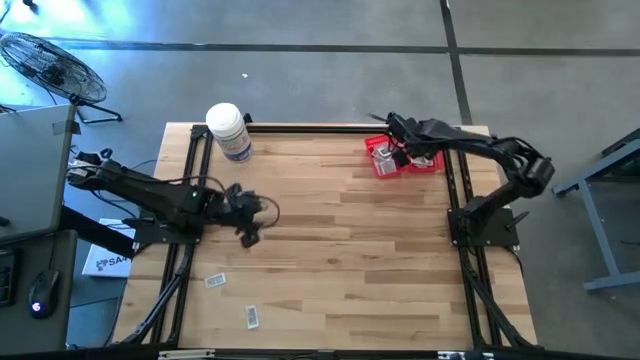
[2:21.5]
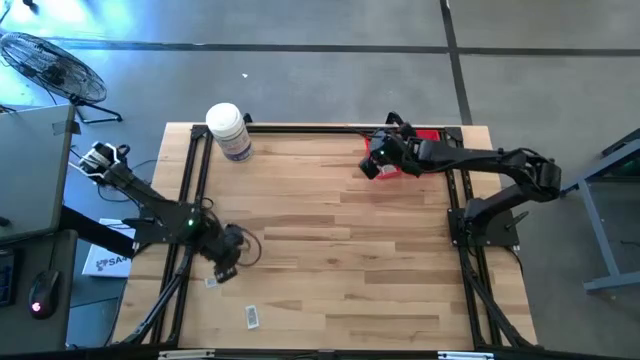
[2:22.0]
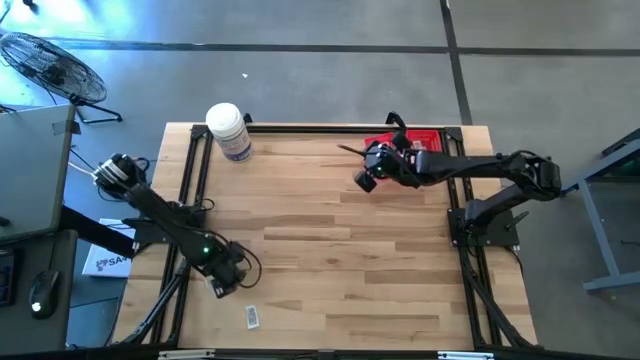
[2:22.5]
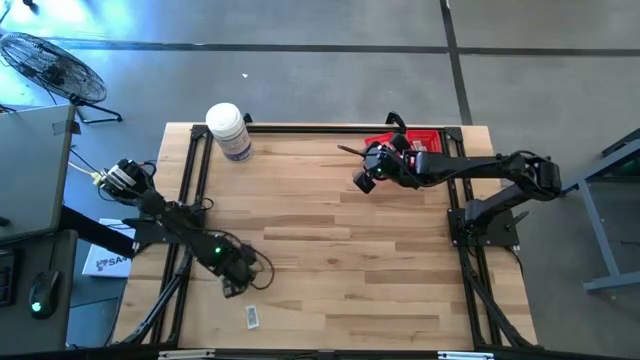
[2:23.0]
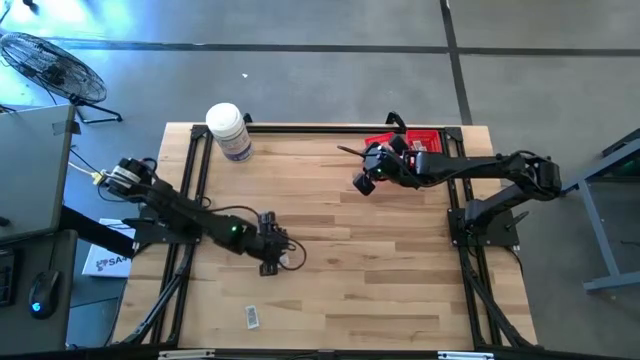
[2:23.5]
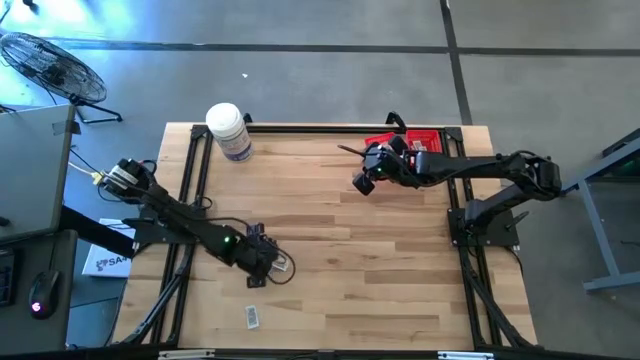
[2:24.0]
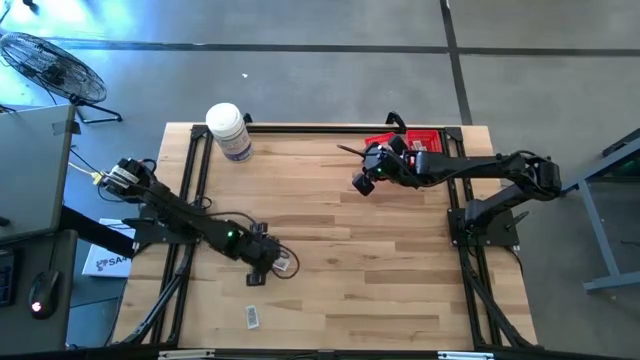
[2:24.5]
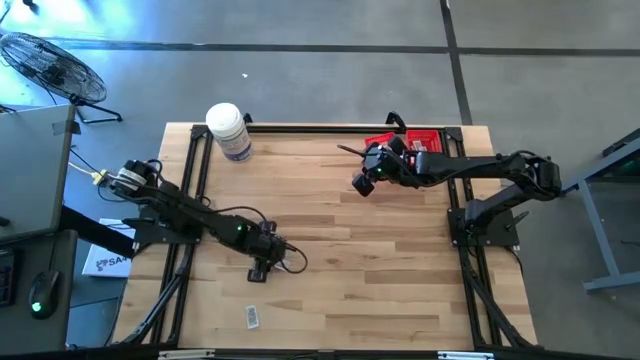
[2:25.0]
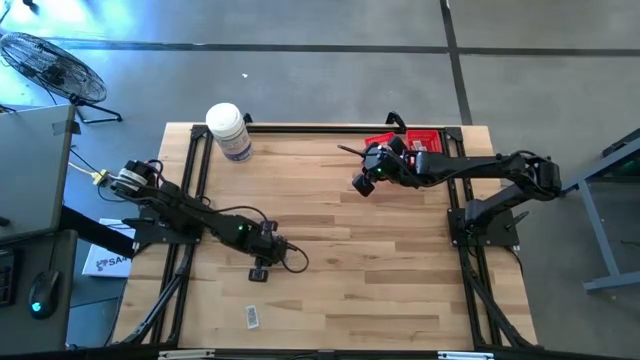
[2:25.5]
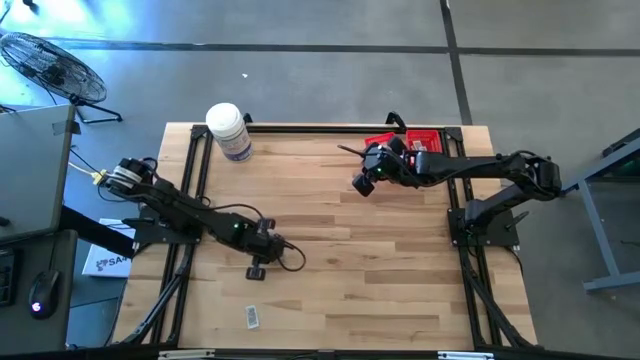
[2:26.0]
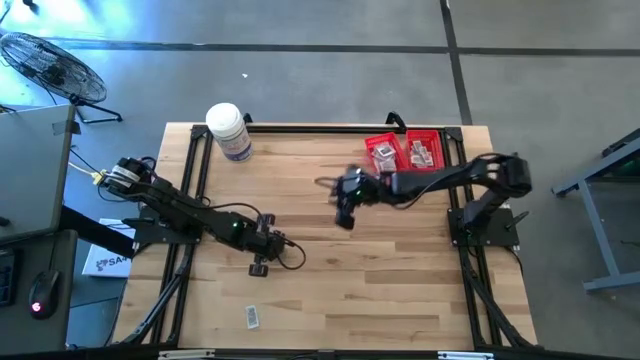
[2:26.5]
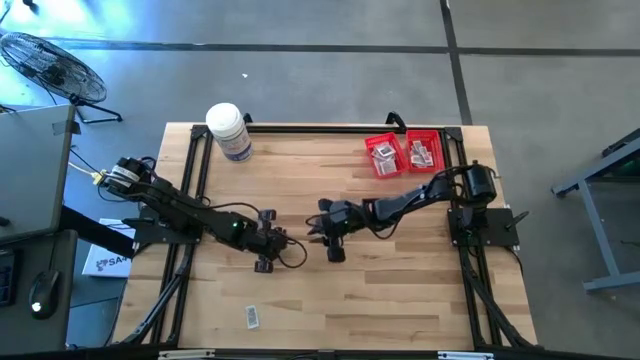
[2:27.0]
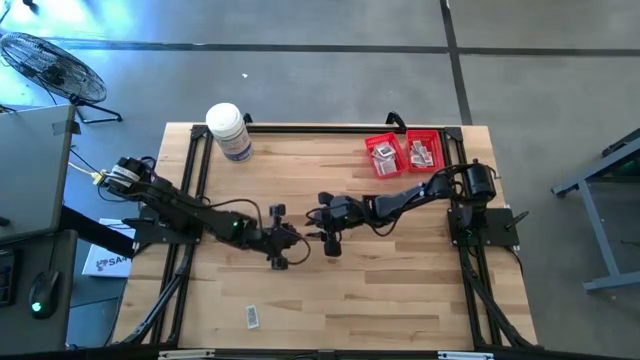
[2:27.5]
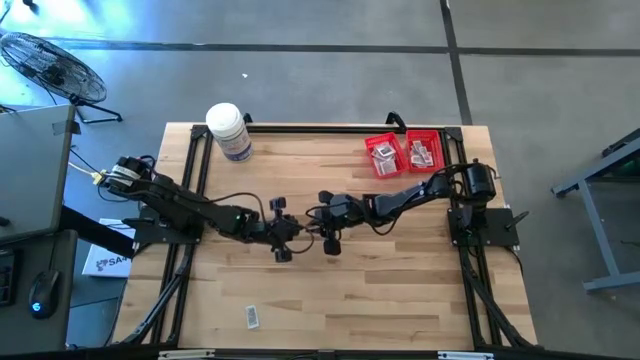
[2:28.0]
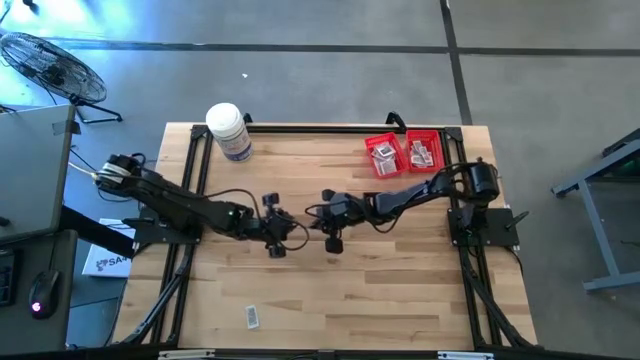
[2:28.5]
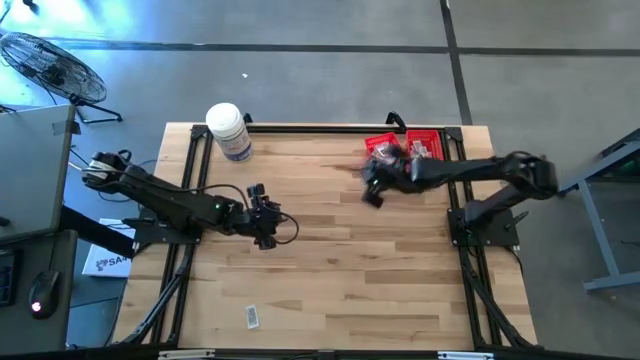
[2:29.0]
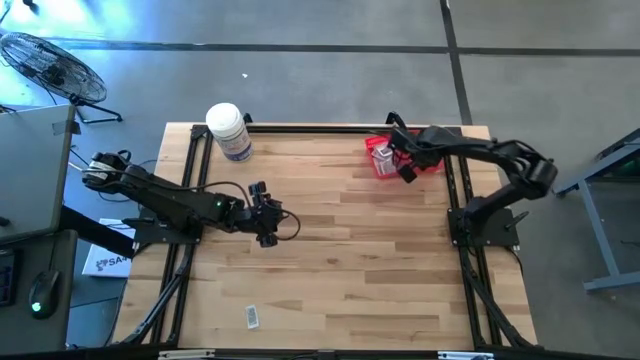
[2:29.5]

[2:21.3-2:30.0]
Task: Pick & Place First Aid Supplies
Put the ointment pack into the right red bin

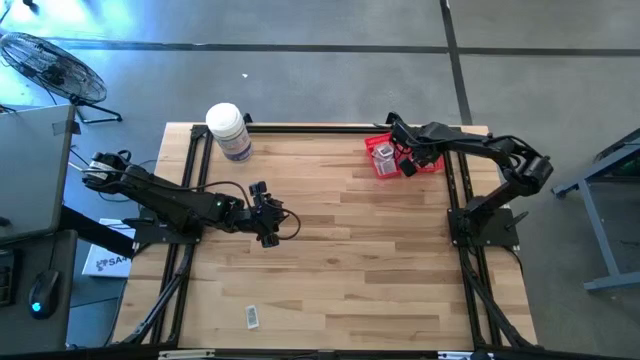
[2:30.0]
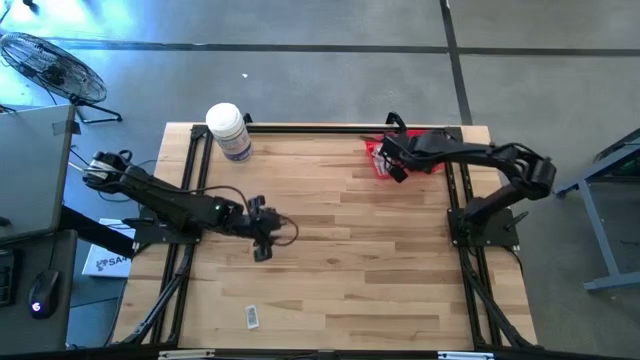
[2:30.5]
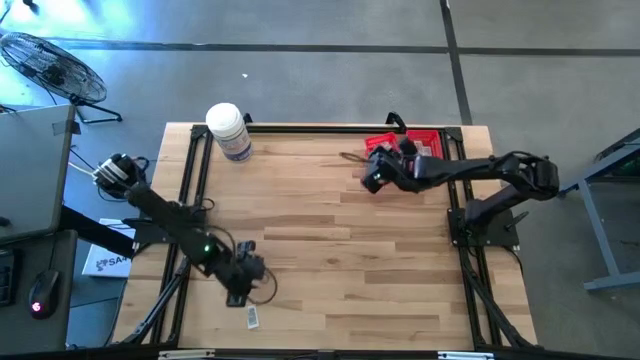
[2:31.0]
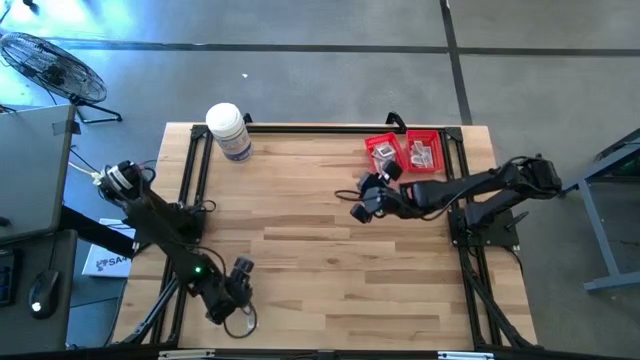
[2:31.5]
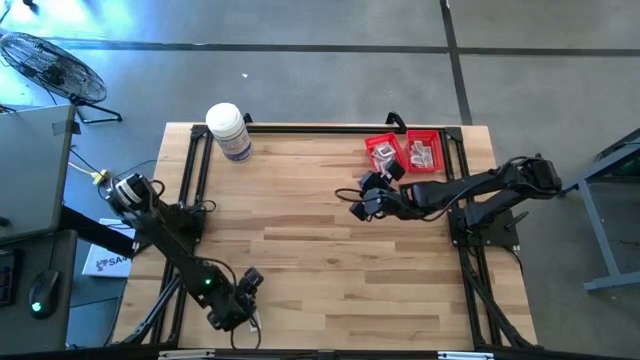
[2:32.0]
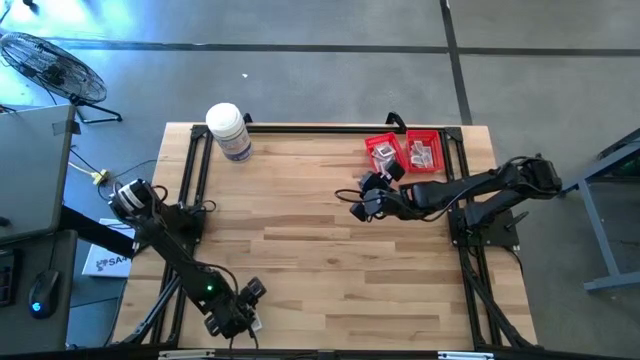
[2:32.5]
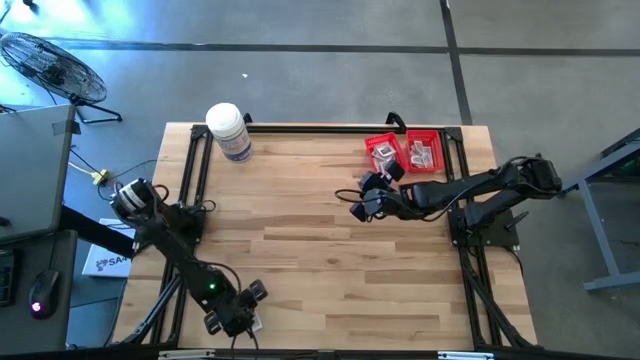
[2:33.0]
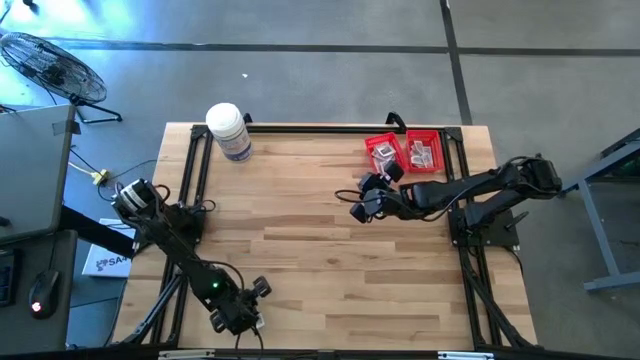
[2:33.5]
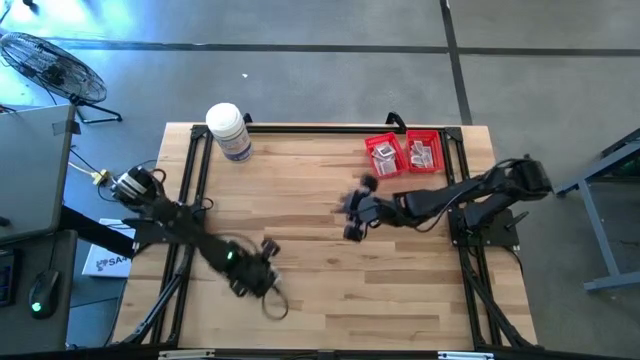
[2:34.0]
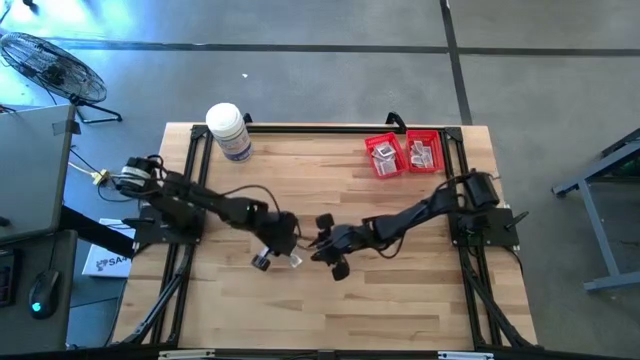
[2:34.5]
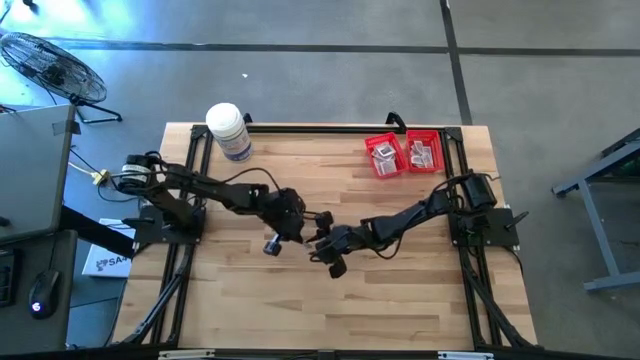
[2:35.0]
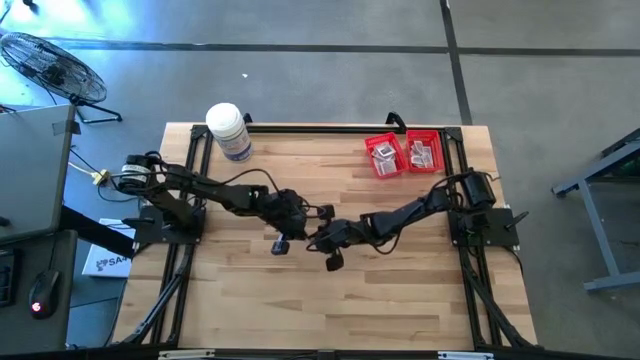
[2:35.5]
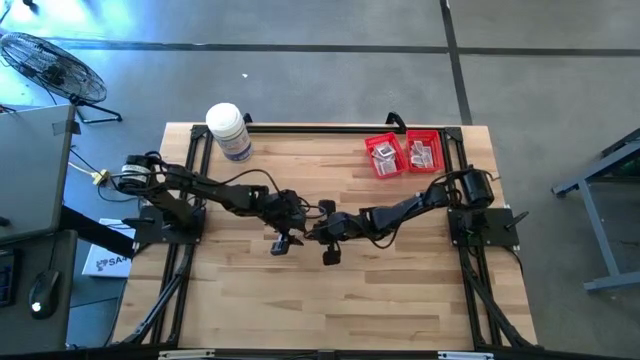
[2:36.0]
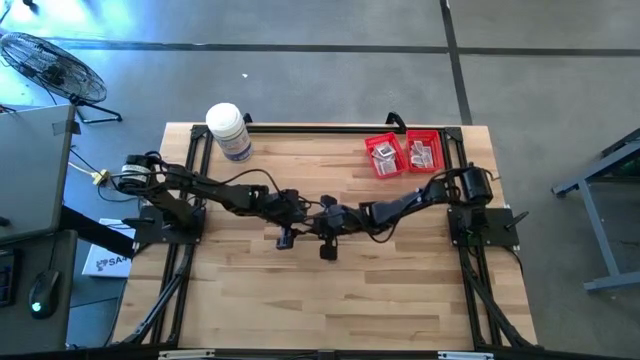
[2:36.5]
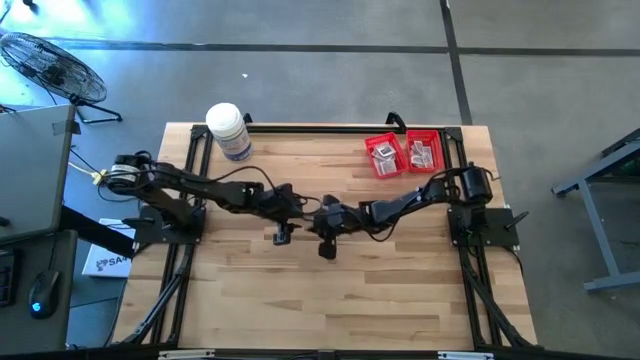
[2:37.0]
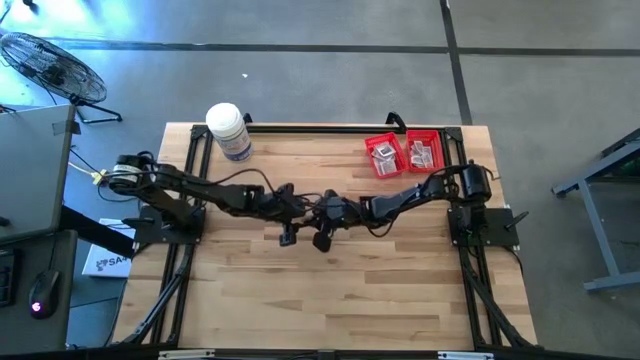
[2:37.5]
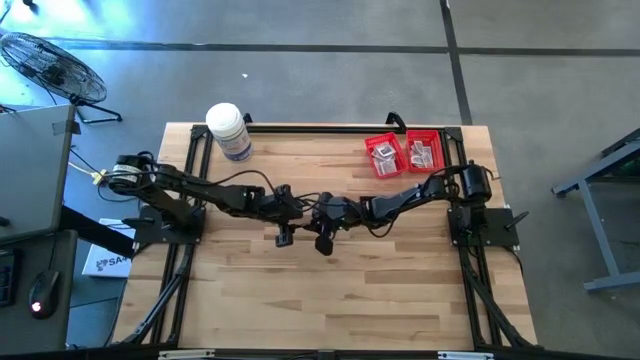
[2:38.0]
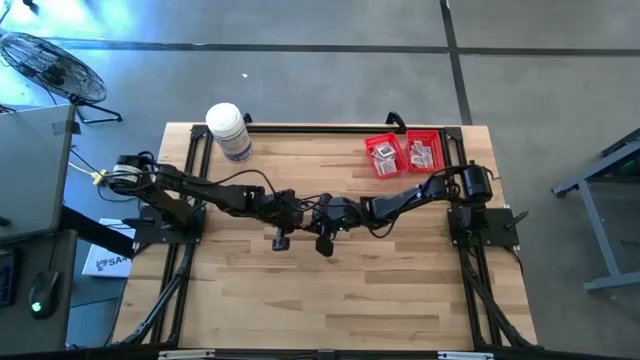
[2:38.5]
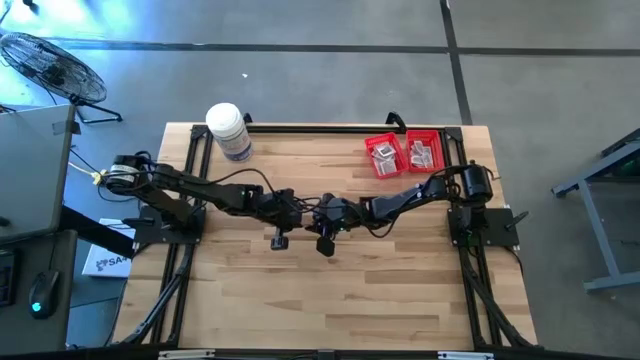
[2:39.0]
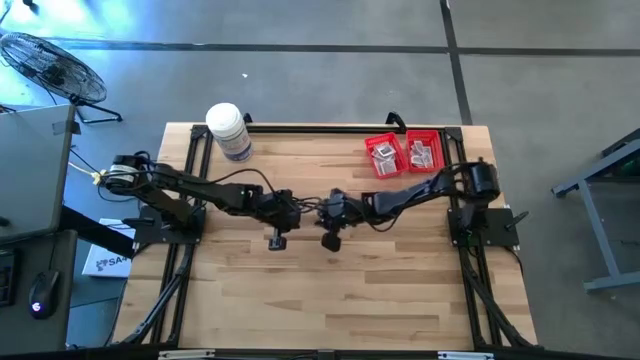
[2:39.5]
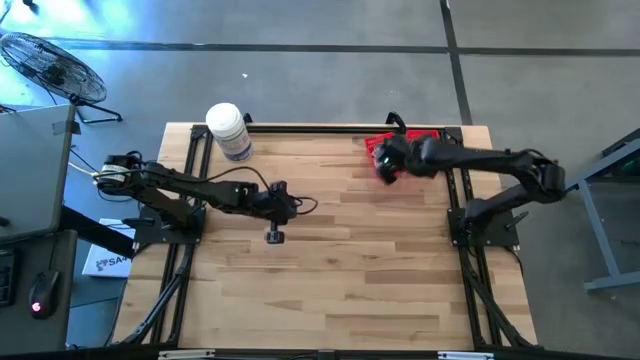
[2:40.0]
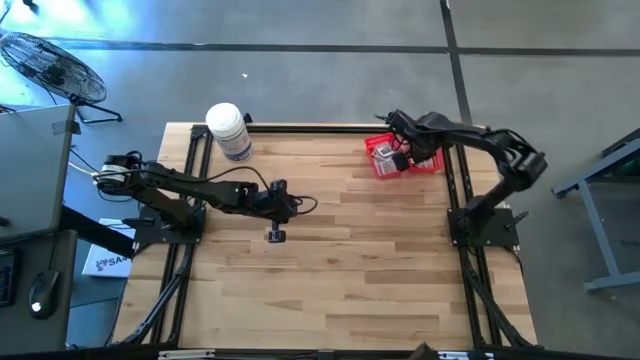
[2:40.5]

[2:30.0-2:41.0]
Put the ointment pack into the right red bin

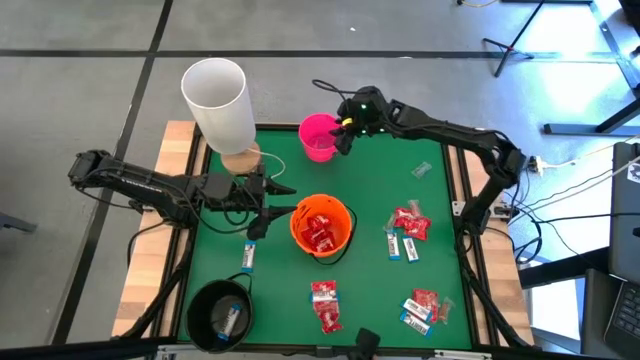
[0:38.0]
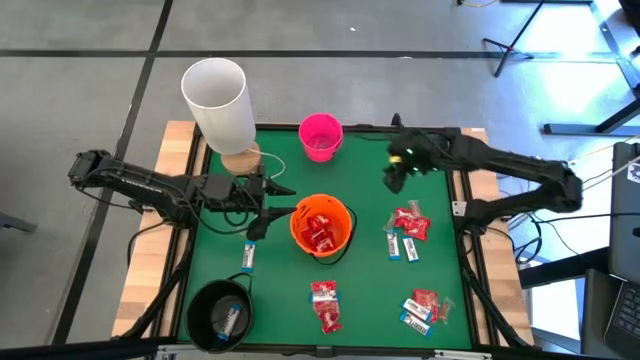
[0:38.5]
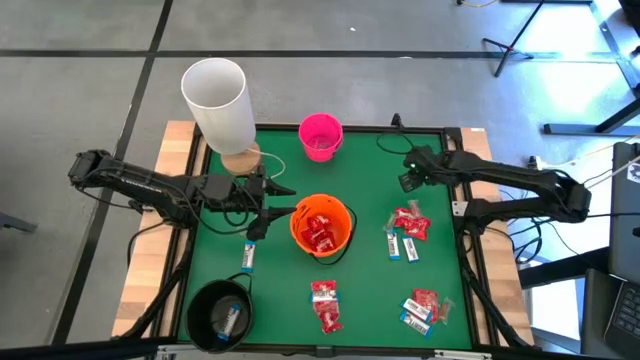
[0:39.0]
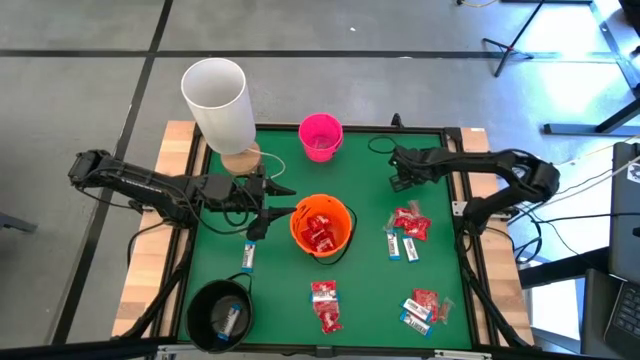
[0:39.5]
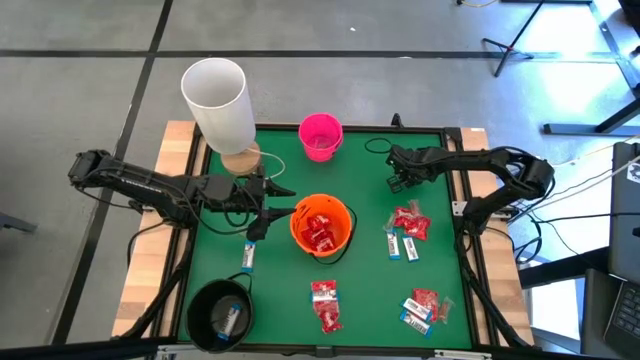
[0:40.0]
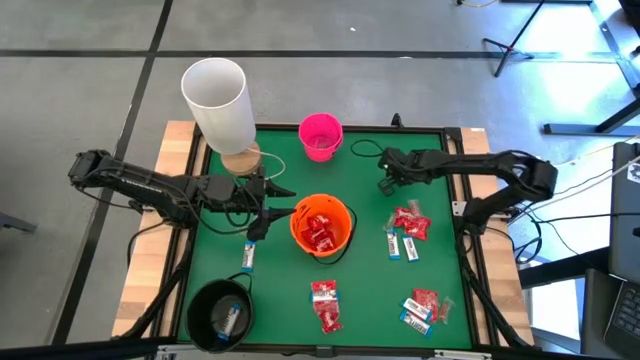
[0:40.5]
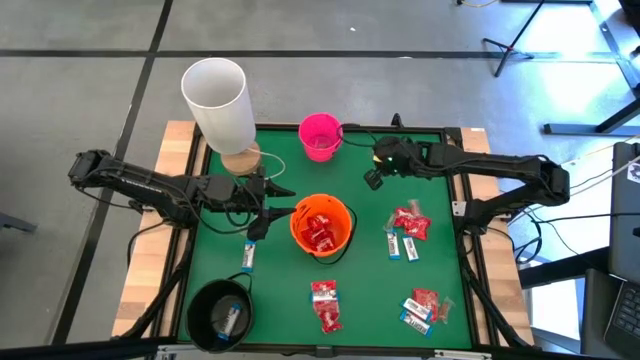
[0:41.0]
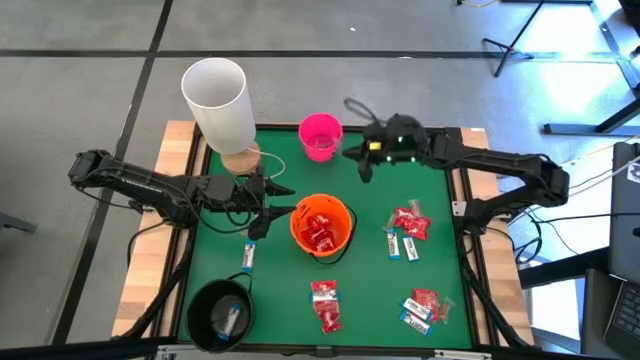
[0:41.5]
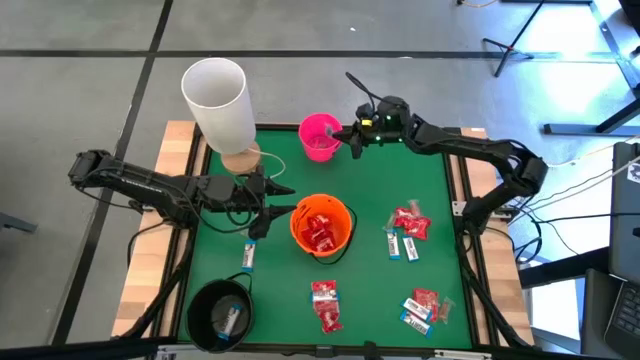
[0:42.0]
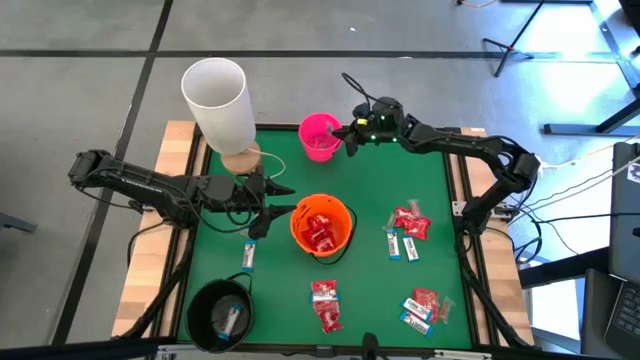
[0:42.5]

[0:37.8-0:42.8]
Task: Sort candy
Put the blue gummy into the pink bucket
